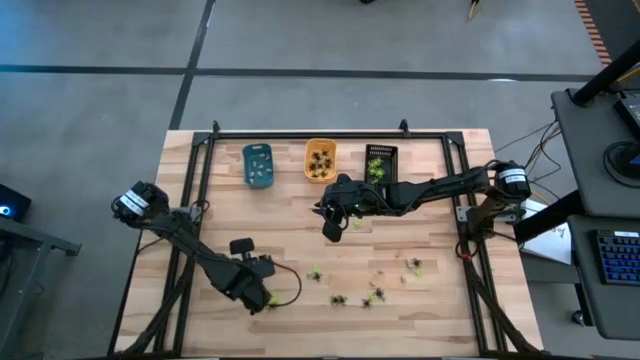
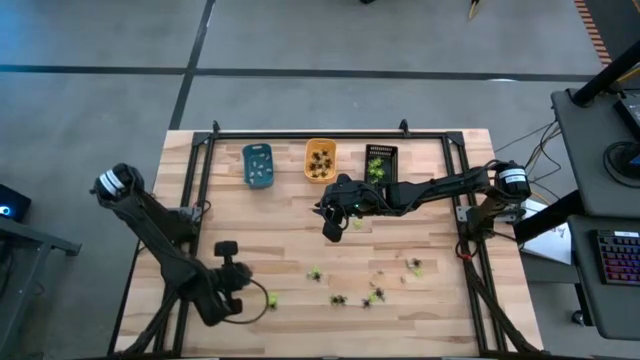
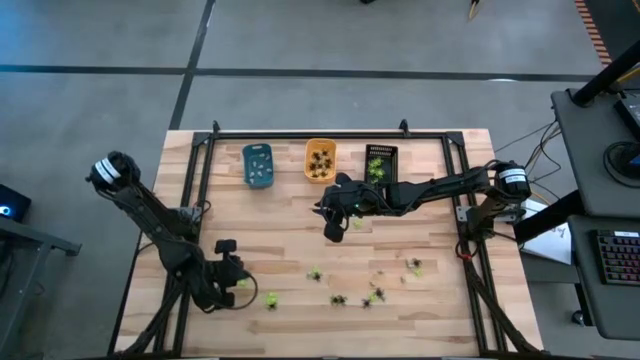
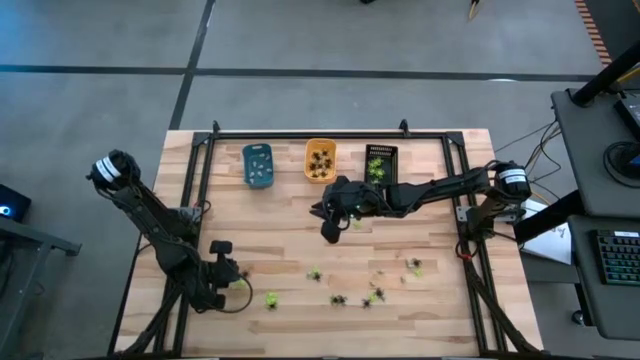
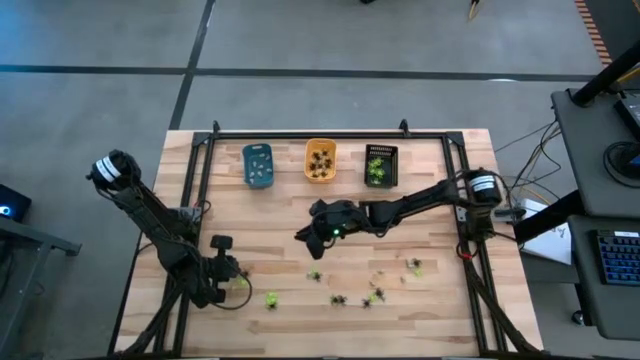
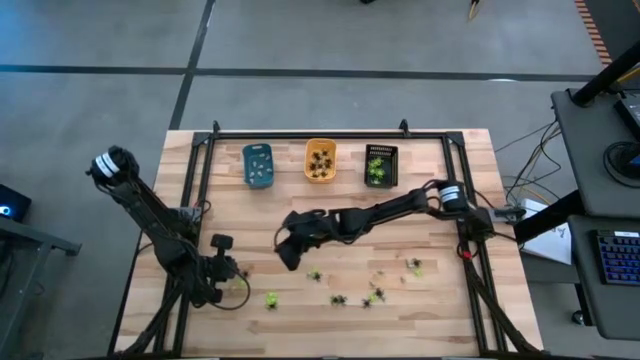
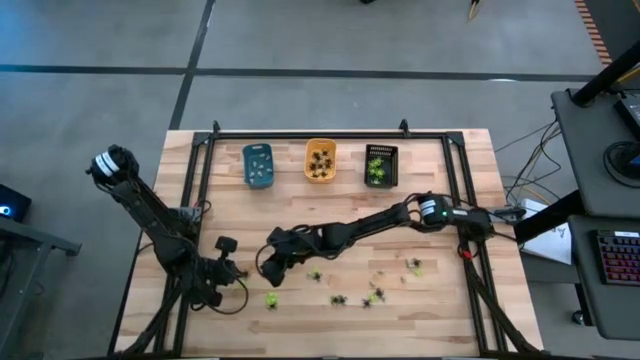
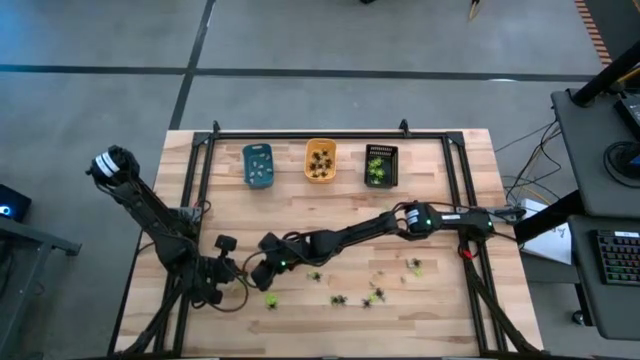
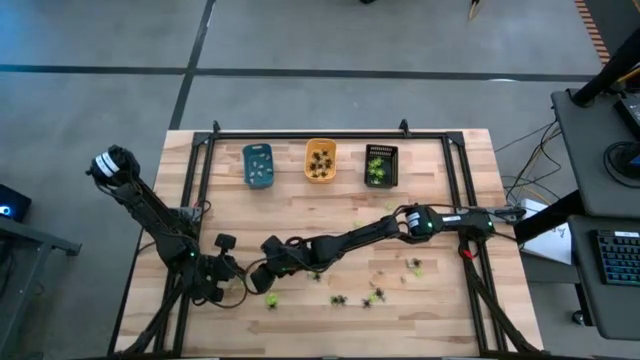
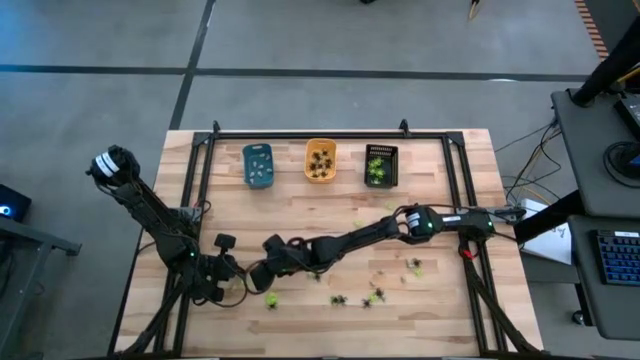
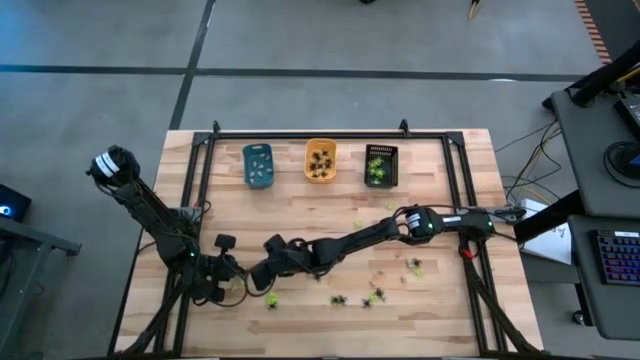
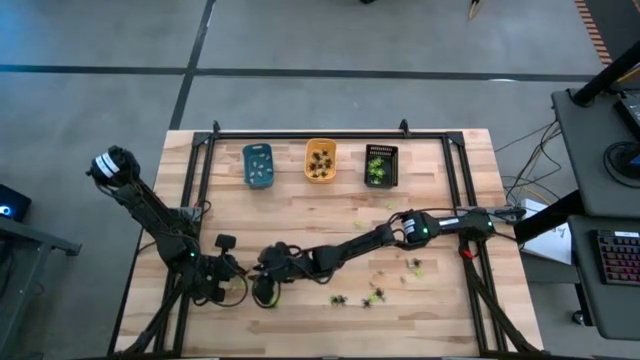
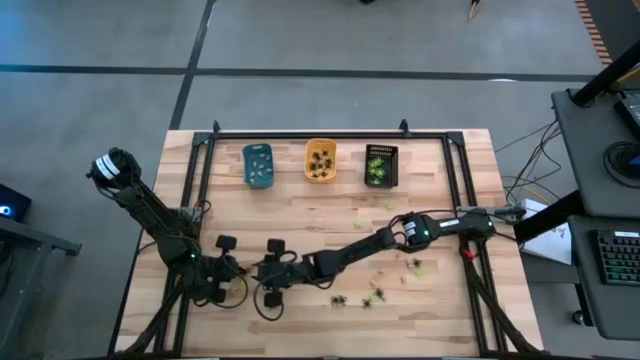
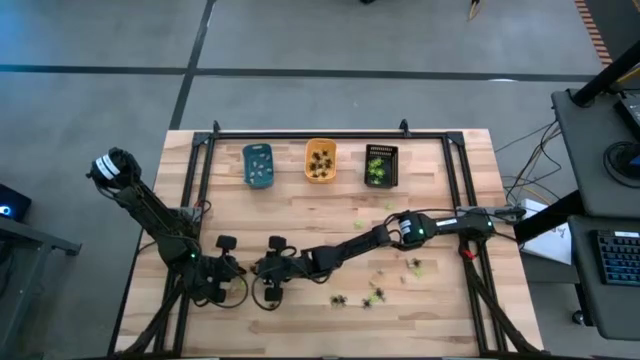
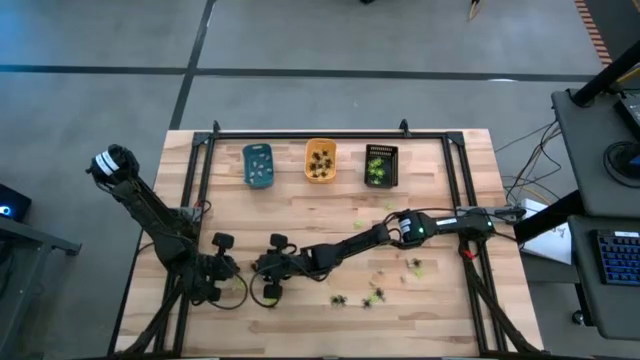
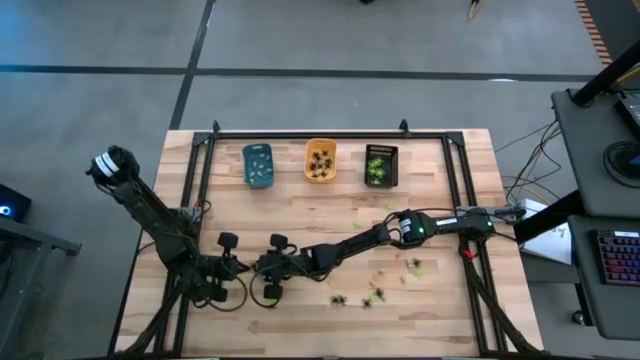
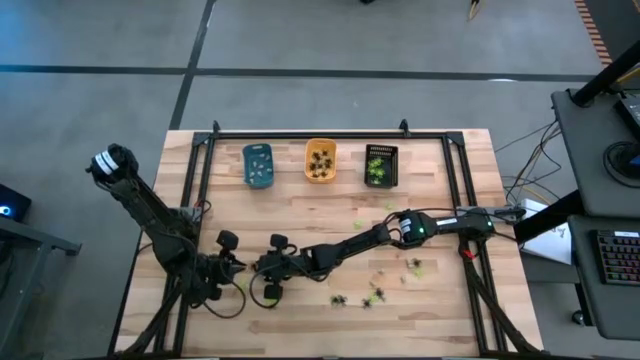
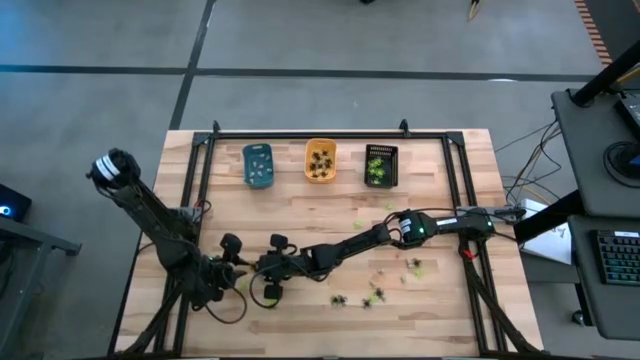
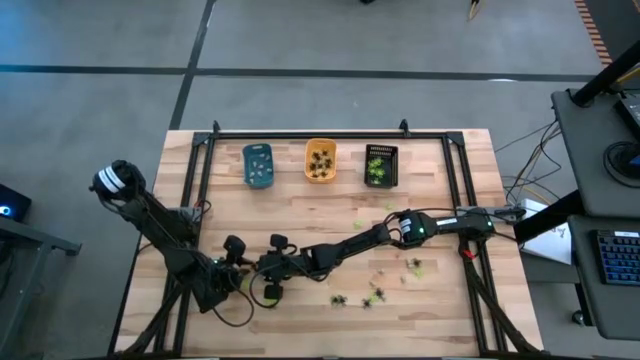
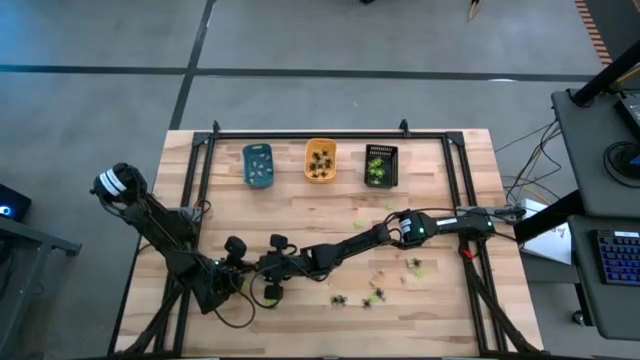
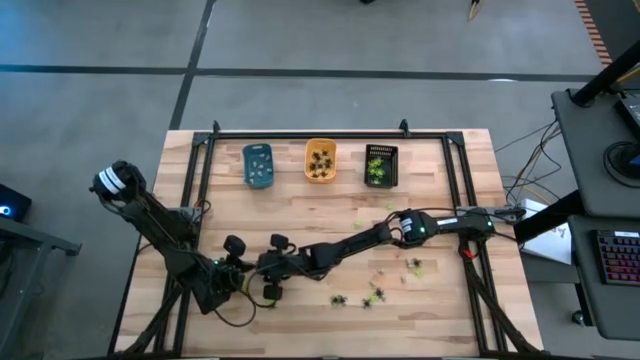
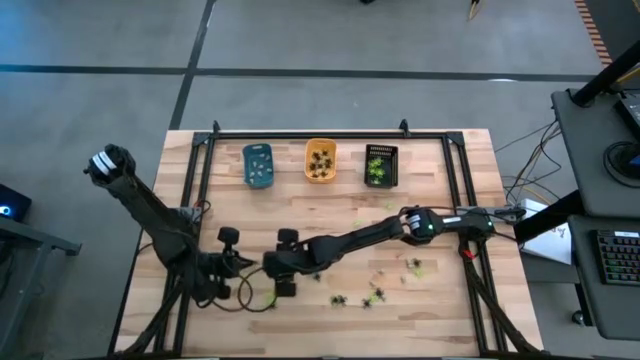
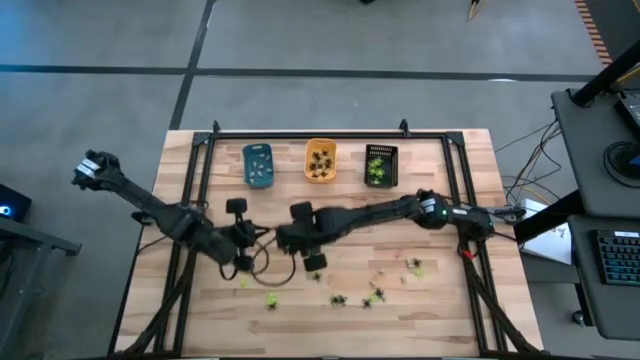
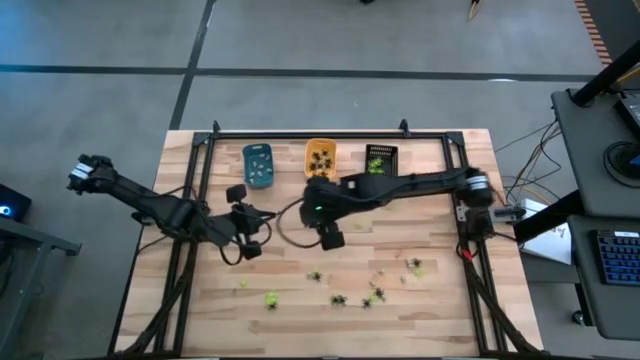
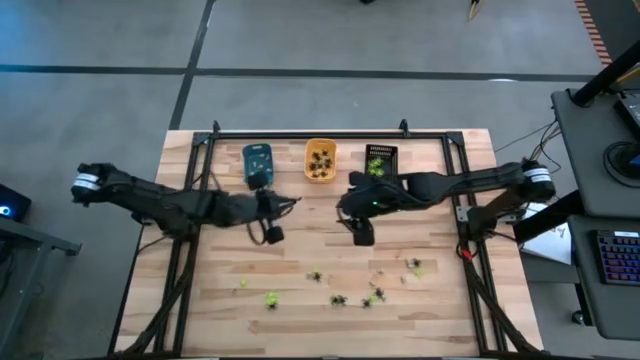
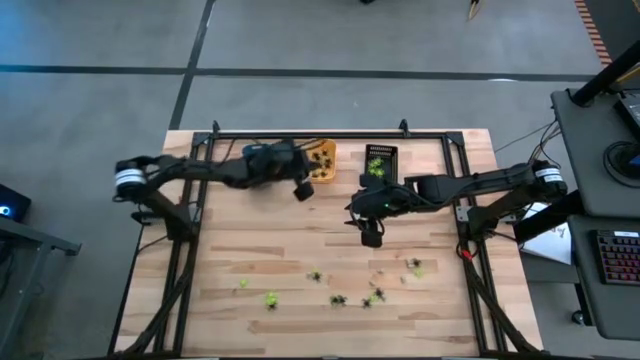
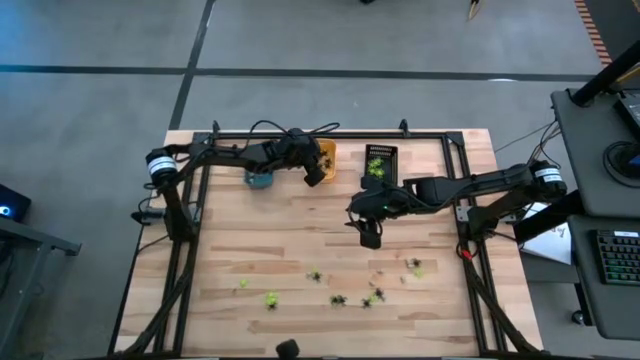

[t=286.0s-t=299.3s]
Task: Sort Halloween decoration
Put the black spider into the orange bin

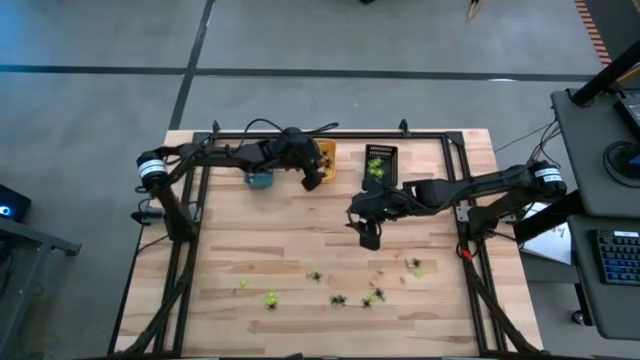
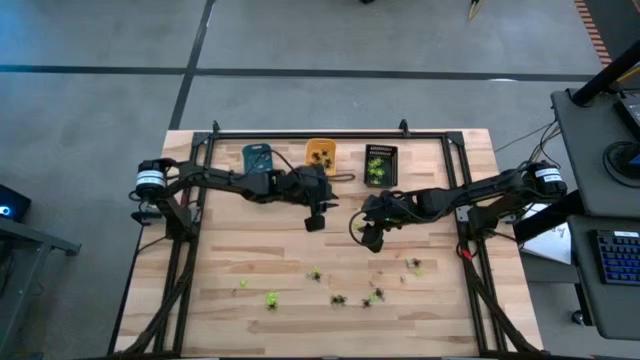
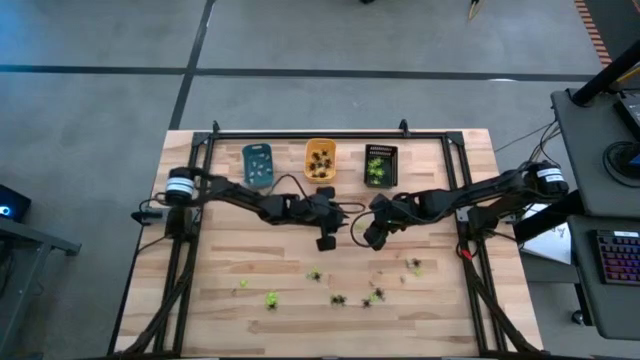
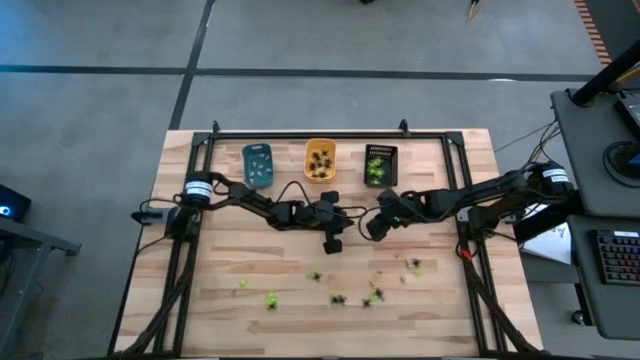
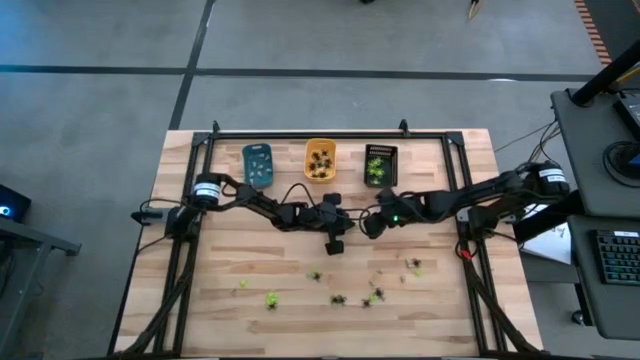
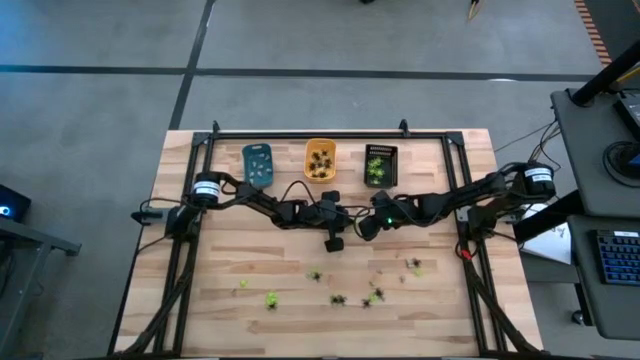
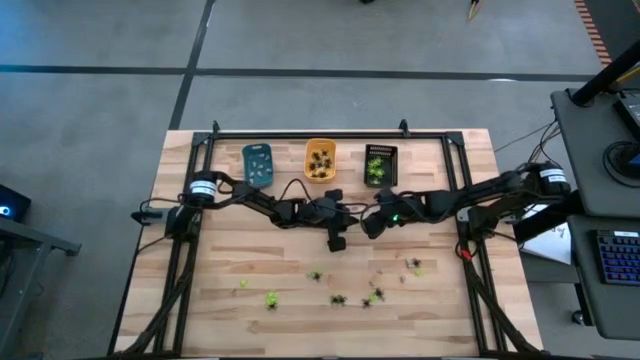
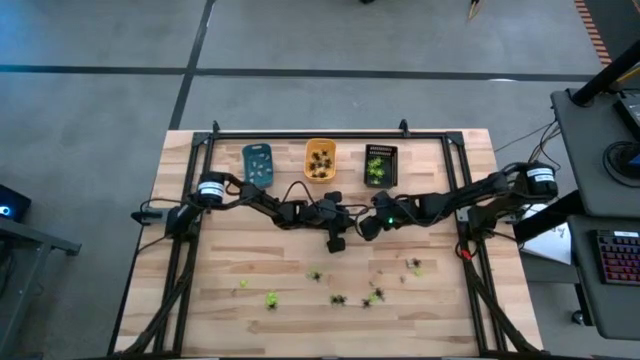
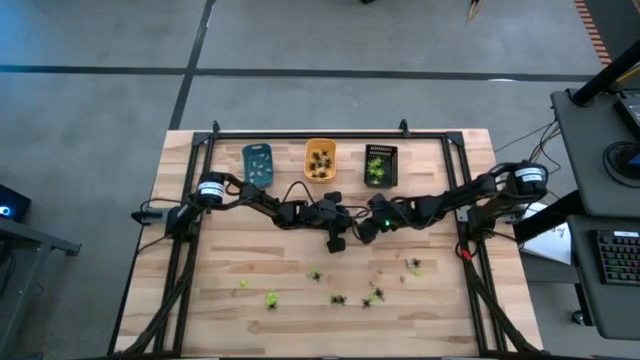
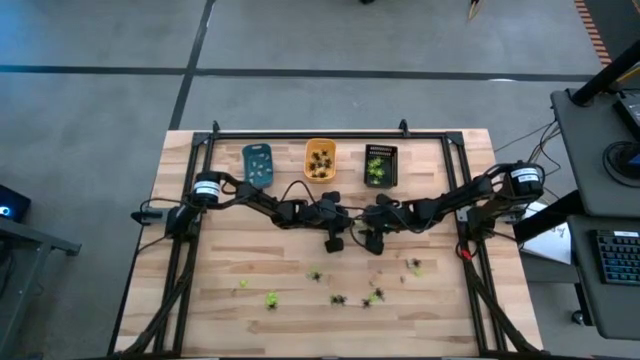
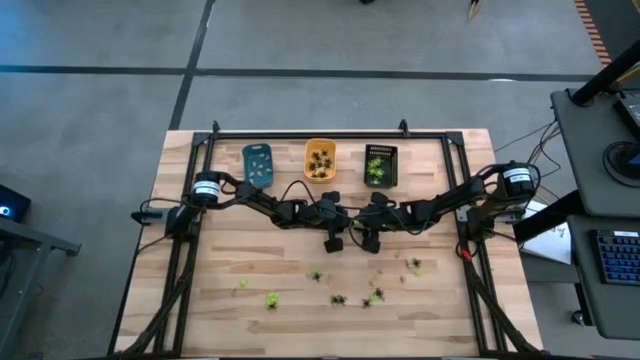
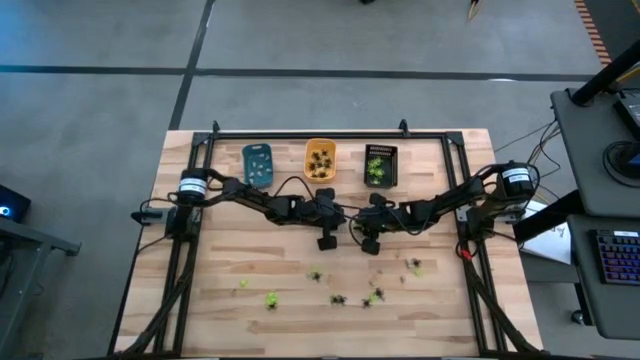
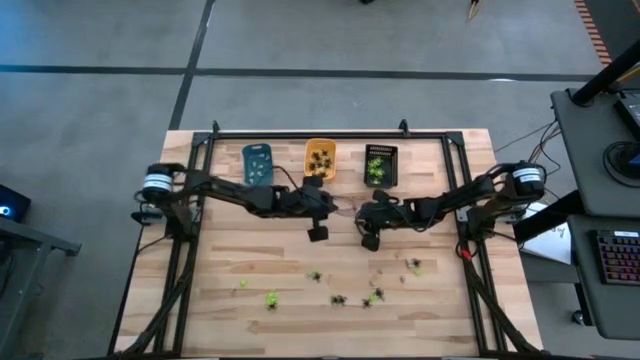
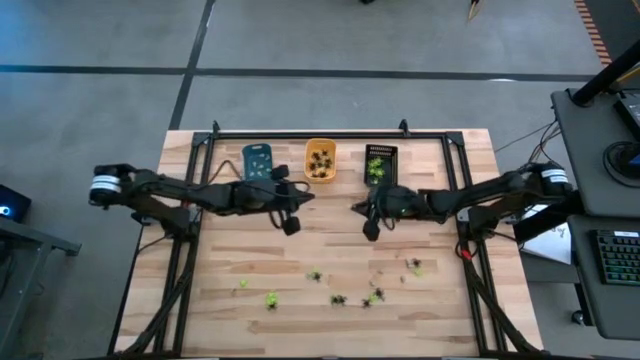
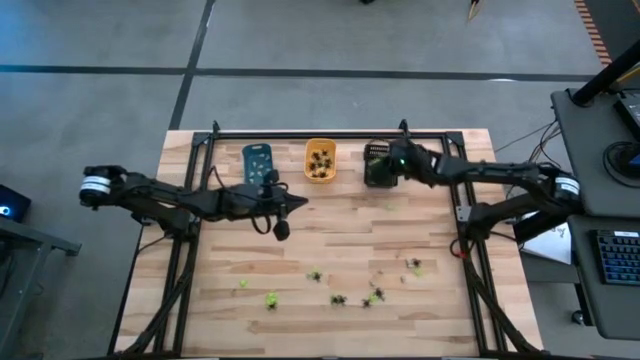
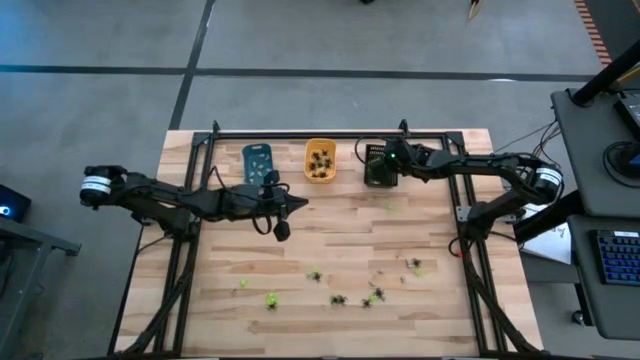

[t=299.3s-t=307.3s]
Put the green spider toy into the black bin
